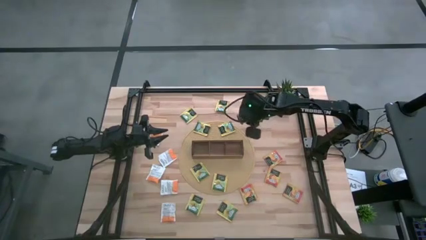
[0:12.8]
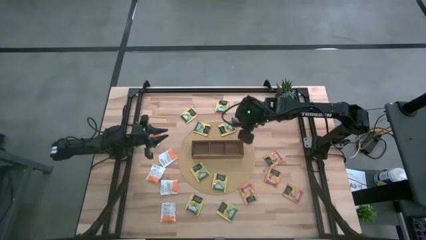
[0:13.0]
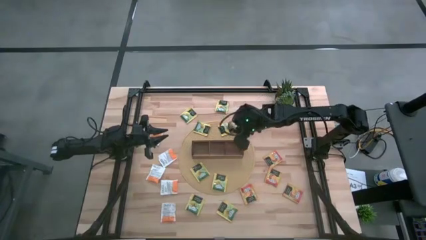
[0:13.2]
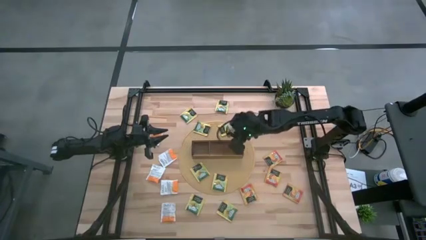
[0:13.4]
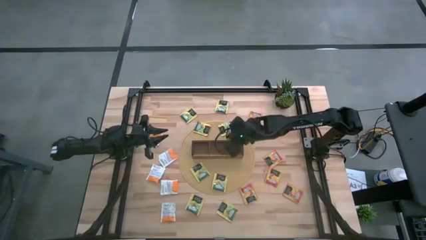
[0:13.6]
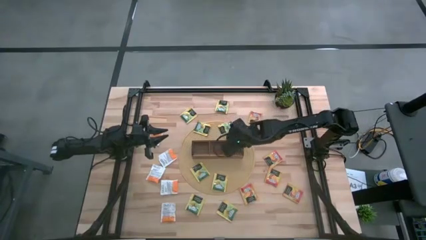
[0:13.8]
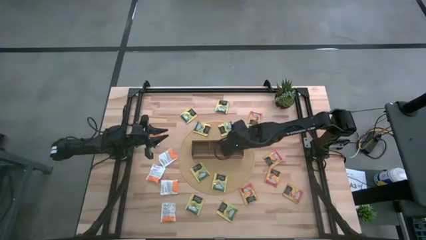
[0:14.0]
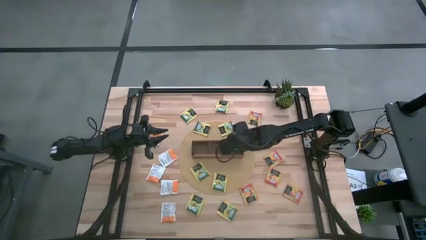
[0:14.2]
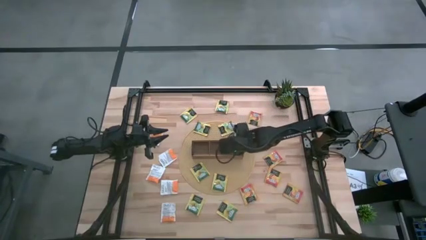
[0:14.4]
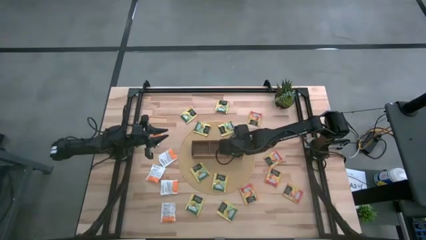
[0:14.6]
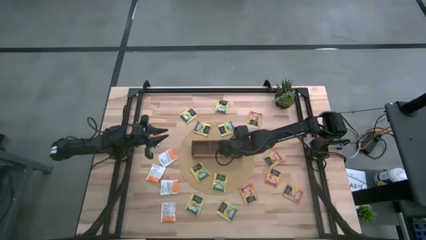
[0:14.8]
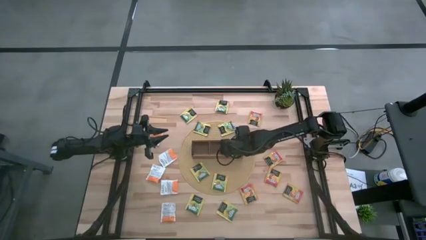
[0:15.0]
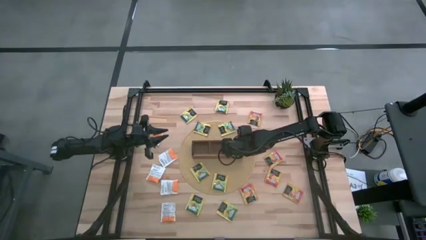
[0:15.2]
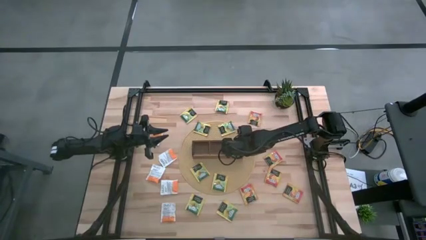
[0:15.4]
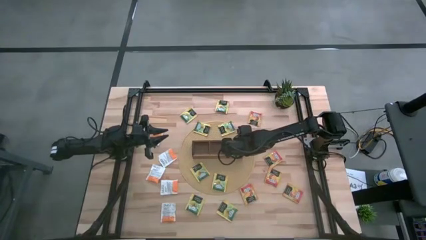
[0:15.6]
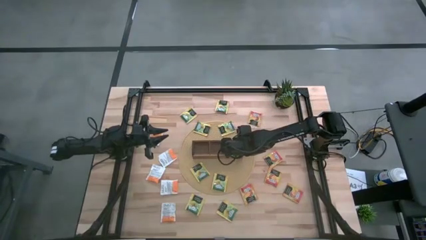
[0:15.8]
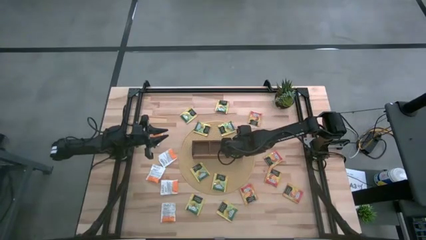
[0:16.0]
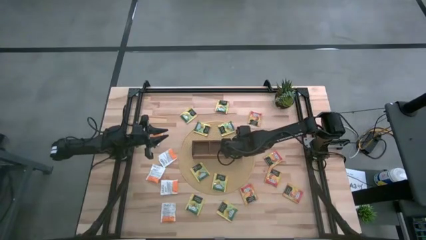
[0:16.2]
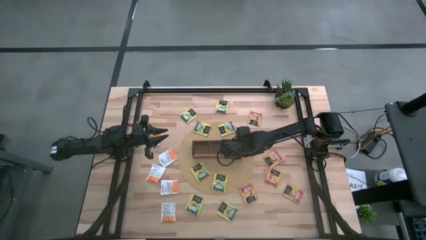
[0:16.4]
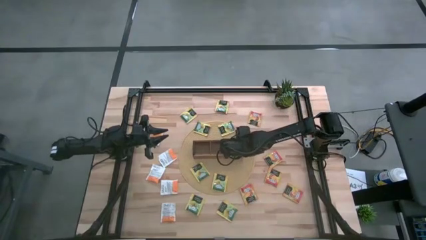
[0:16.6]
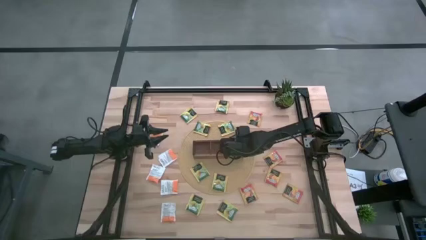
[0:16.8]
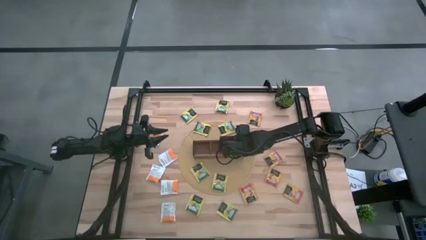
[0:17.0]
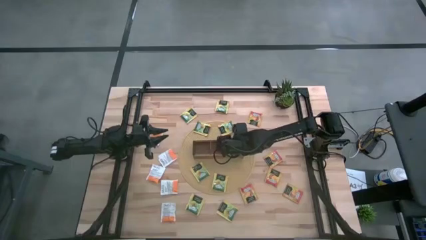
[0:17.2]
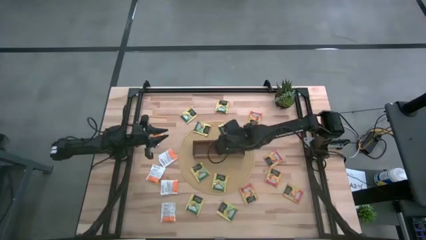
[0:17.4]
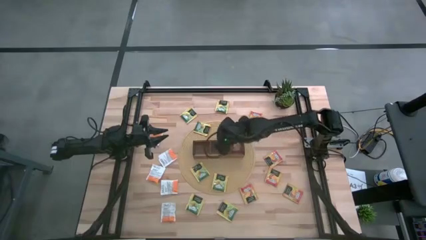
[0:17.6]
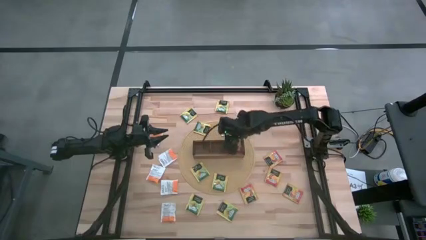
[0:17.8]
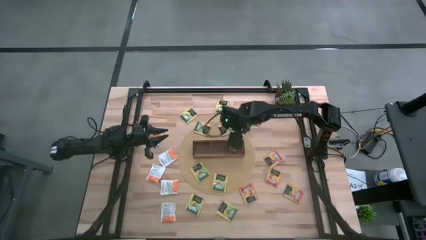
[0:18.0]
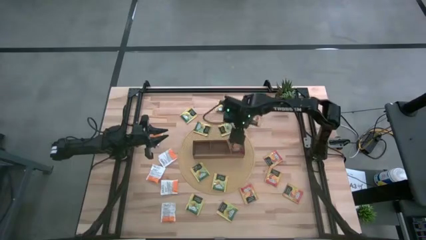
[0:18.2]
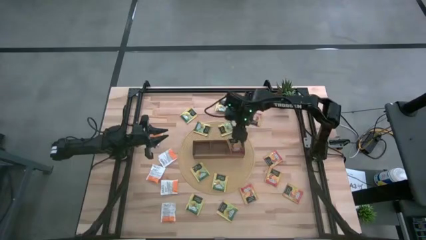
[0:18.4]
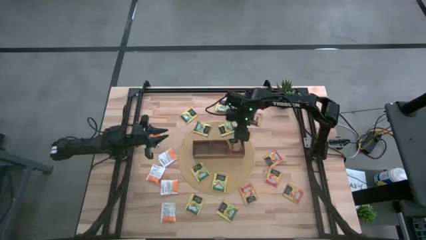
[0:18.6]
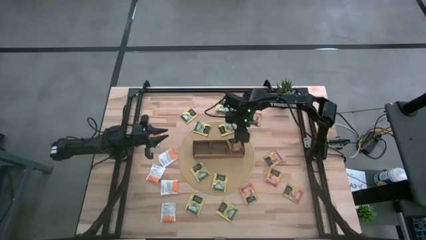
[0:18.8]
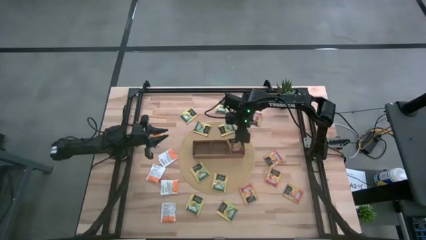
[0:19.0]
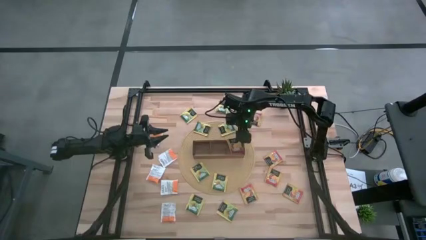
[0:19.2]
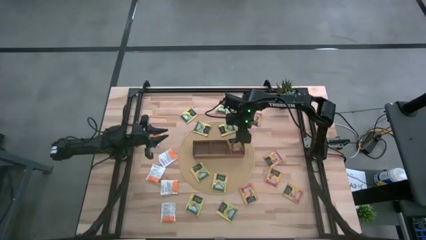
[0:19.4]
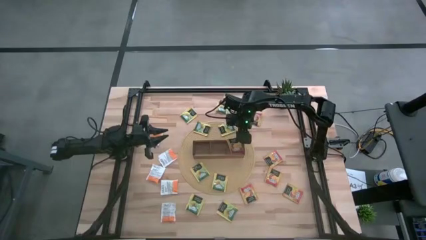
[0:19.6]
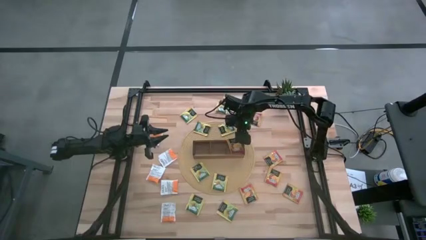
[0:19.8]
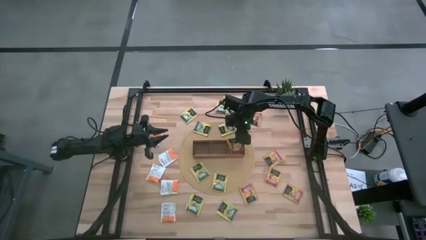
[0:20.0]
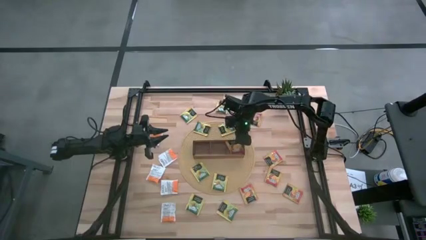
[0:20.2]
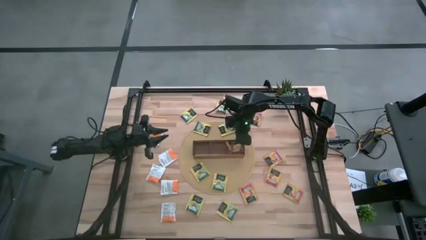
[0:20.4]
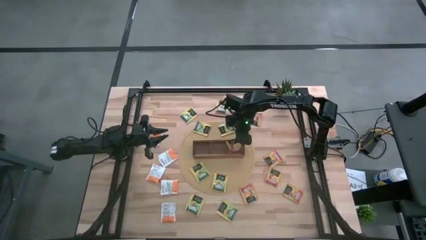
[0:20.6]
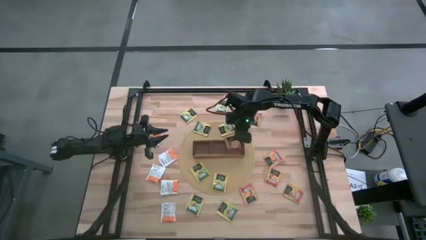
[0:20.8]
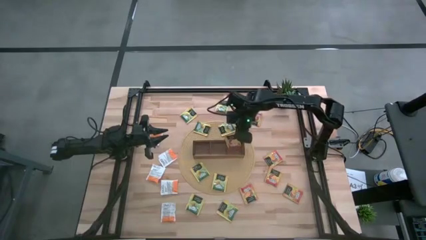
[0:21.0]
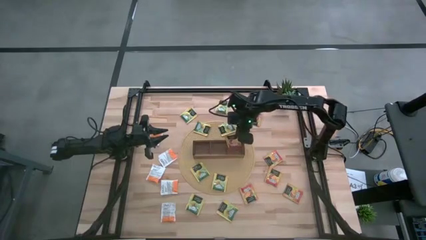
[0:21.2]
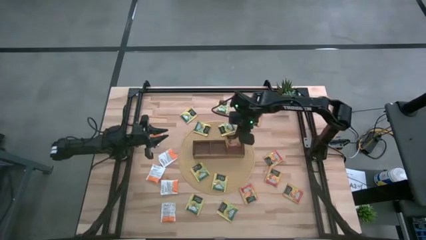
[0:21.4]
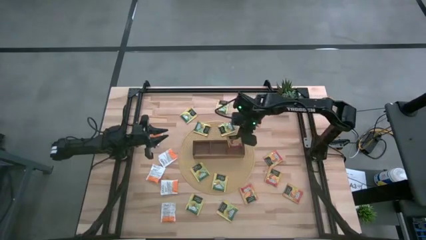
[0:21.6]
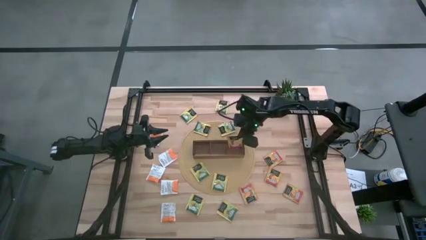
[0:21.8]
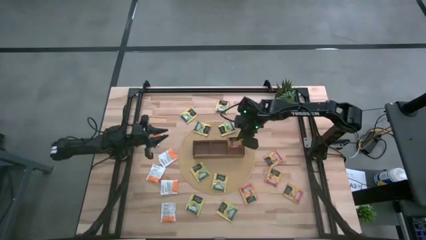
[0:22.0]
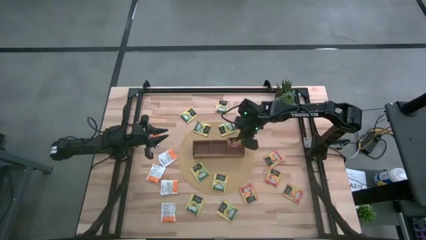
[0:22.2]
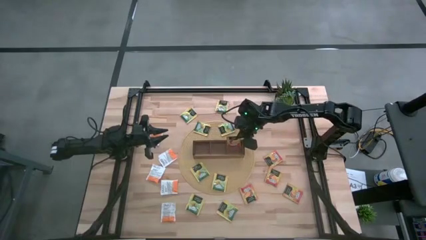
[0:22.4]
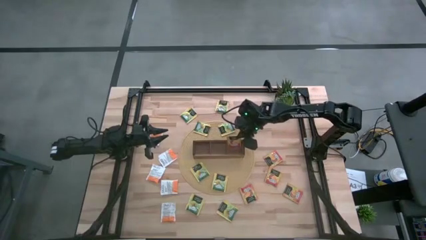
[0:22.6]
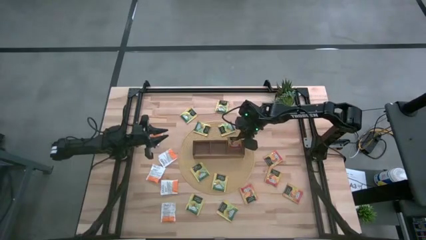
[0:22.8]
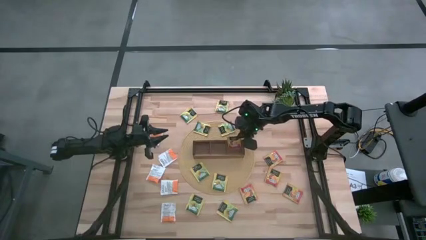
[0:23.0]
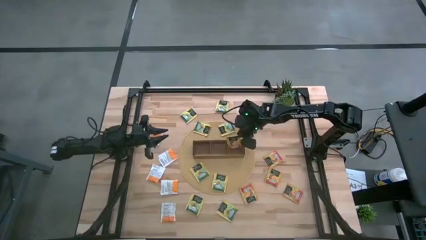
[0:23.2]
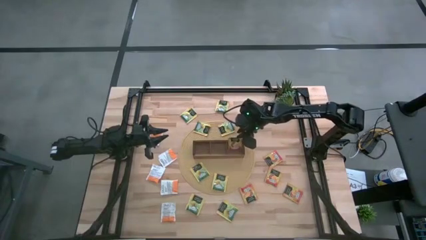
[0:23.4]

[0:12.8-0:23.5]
Task: Pick & Place Tea
Put the orange tea bag into the right section of the wooden organizer

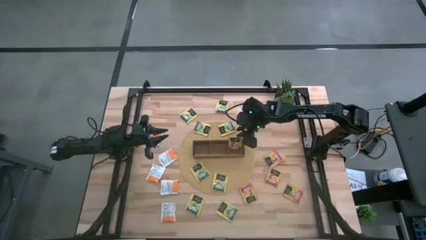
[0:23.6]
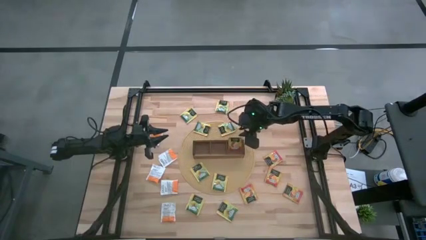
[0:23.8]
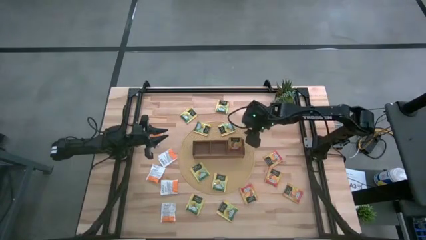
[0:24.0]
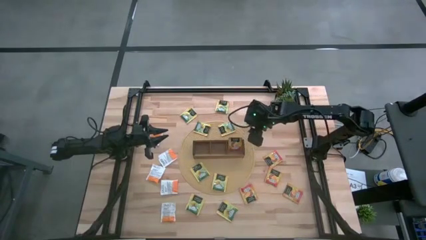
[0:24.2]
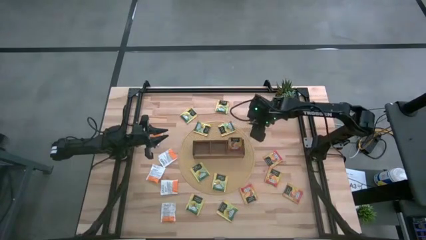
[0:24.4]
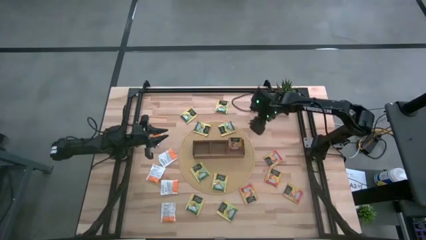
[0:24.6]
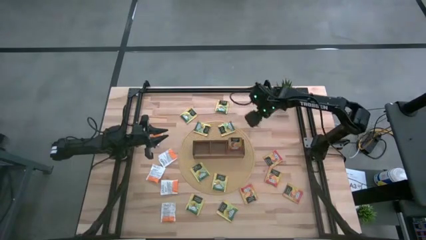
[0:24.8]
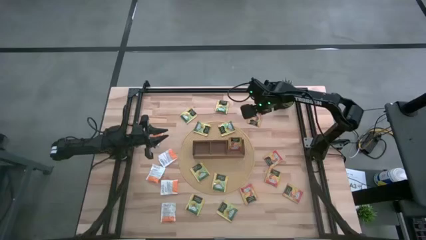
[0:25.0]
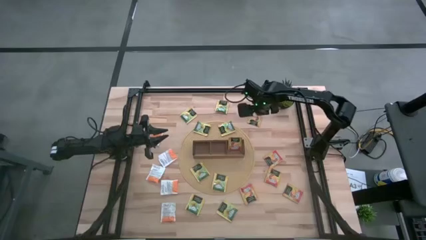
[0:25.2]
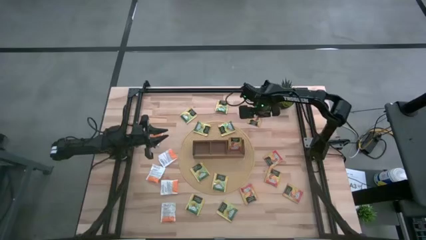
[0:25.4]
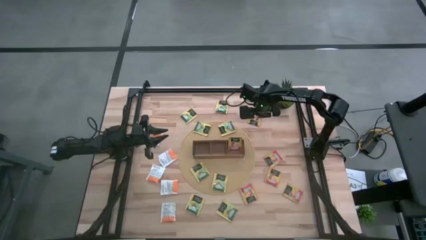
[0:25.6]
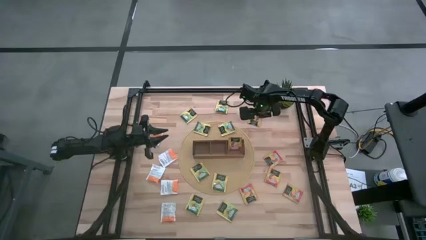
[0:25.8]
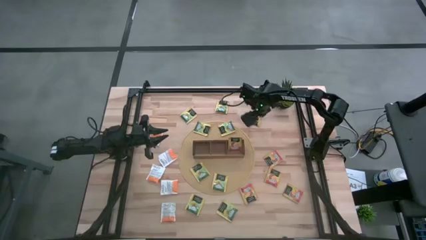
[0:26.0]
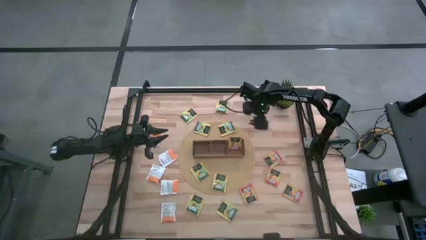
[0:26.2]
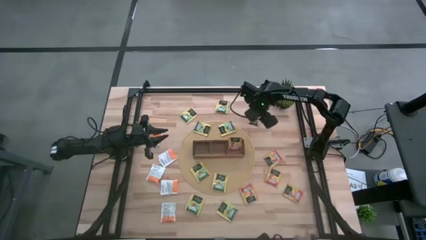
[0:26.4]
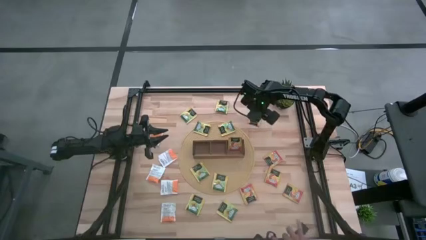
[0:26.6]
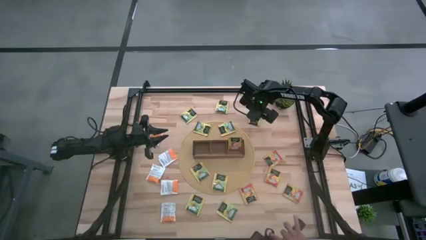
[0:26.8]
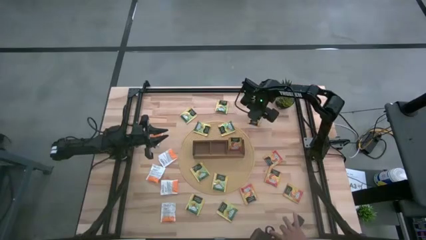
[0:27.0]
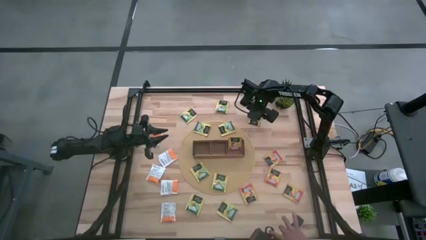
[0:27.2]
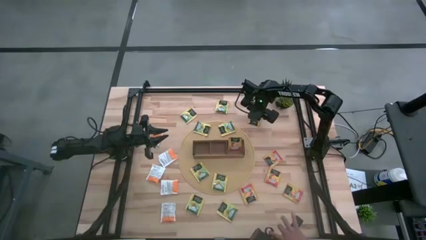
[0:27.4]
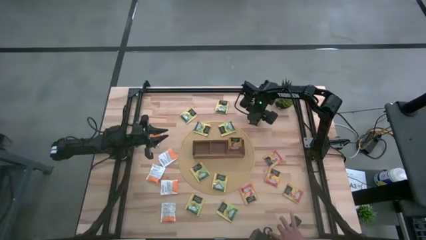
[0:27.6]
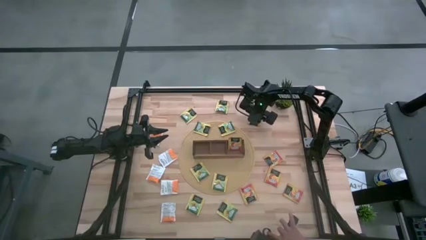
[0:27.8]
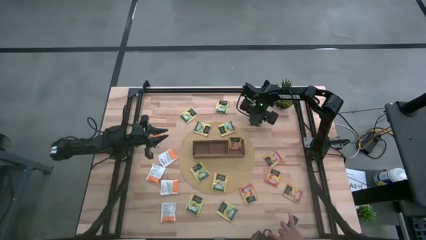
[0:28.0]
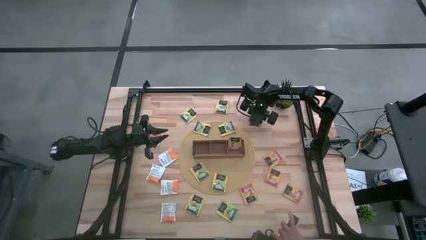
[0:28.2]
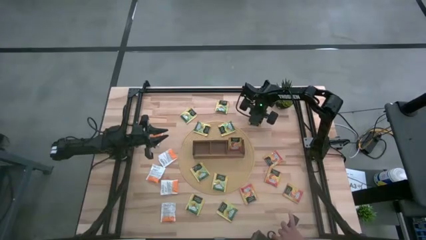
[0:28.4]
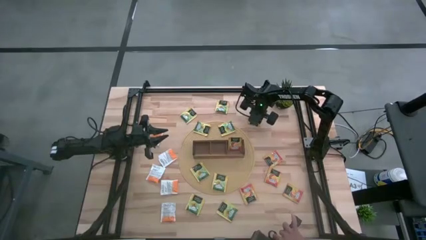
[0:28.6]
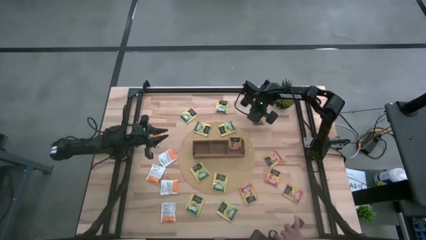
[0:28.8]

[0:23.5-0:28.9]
Put the orange tea bag into the right section of the wooden organizer

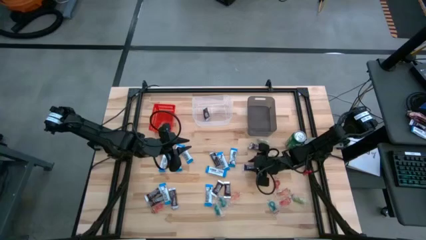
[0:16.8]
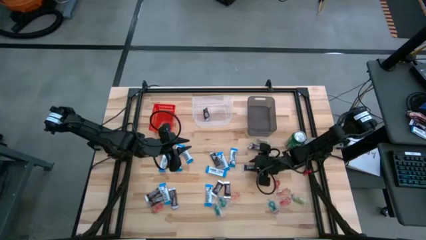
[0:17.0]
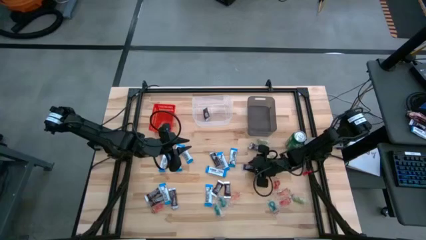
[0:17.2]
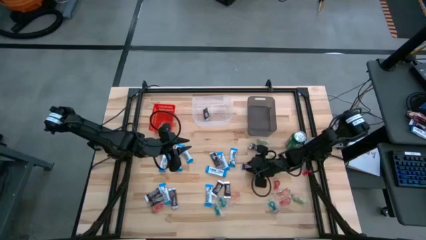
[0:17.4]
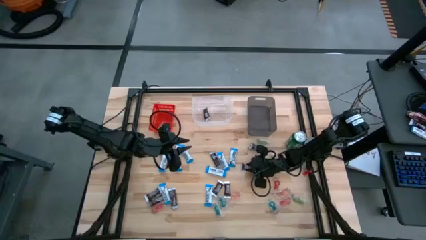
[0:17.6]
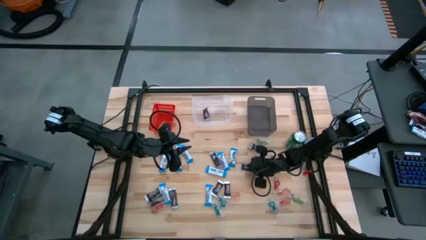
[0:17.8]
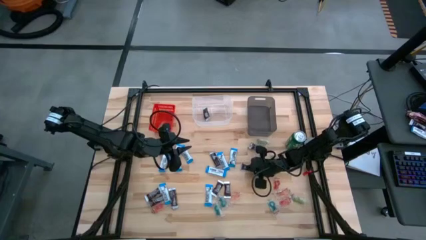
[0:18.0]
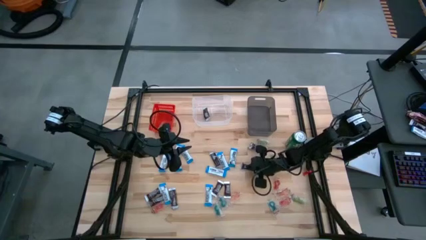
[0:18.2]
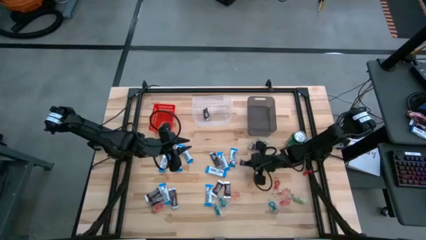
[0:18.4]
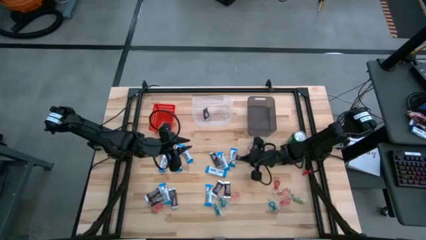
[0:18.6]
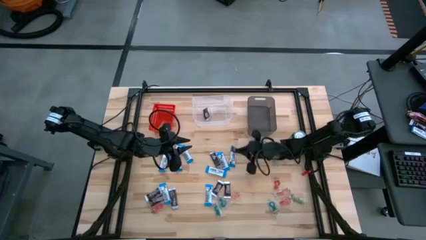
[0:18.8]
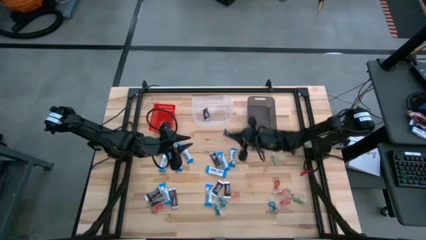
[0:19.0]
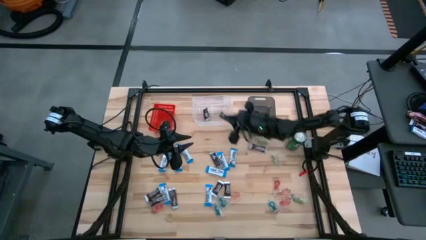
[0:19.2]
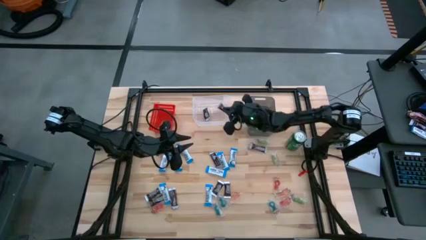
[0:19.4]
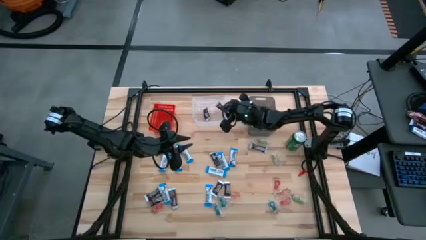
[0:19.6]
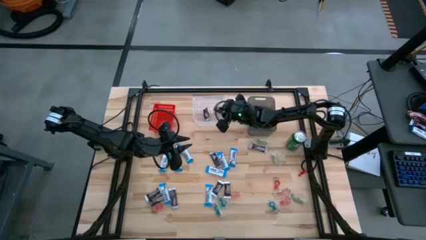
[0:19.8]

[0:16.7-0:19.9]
Task: Sort candy
Put the black chocolate bar into the transparent bin
